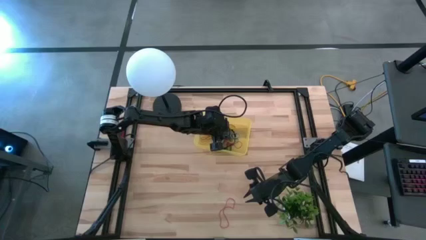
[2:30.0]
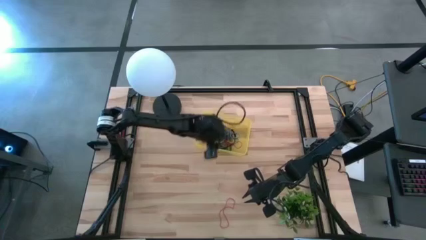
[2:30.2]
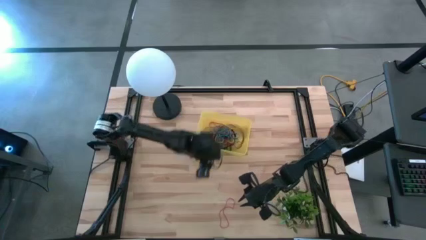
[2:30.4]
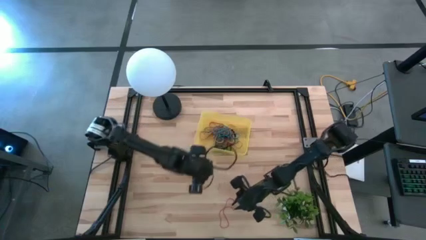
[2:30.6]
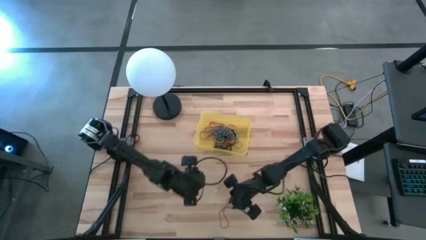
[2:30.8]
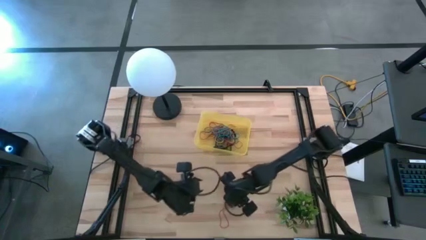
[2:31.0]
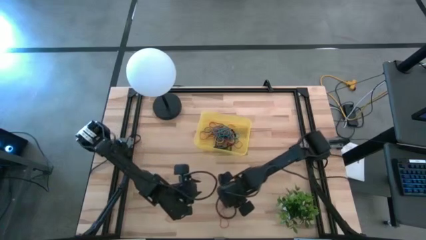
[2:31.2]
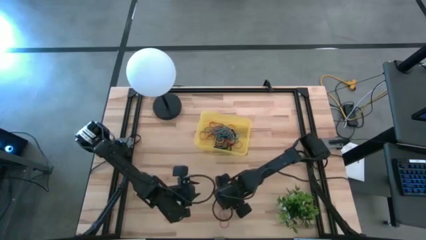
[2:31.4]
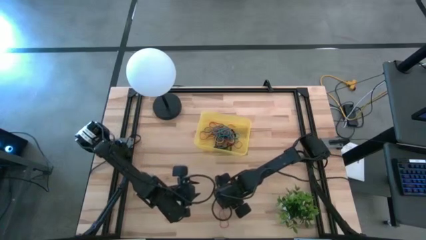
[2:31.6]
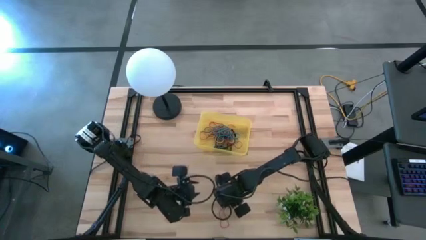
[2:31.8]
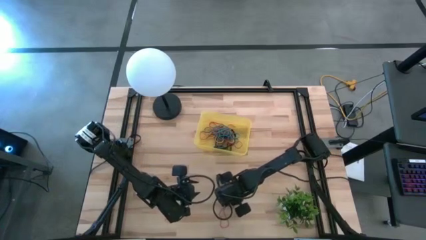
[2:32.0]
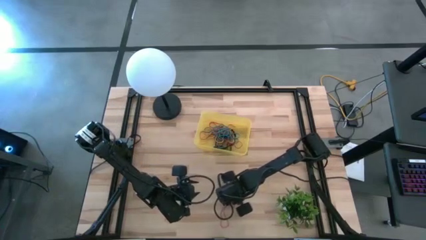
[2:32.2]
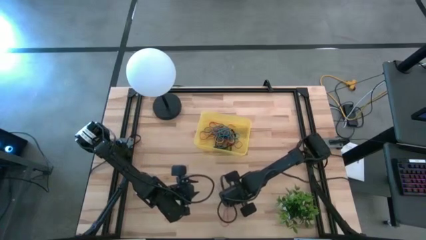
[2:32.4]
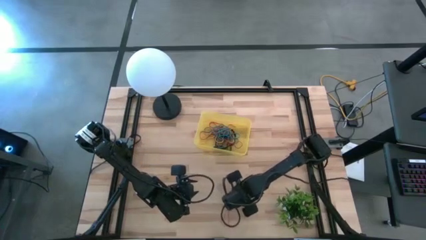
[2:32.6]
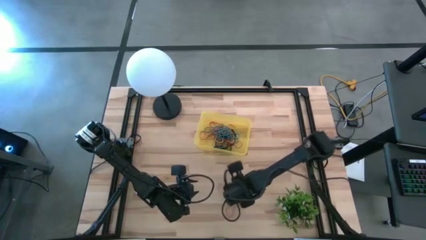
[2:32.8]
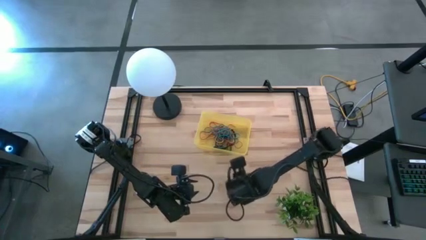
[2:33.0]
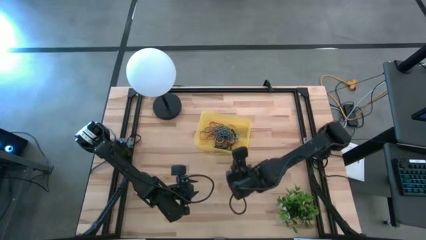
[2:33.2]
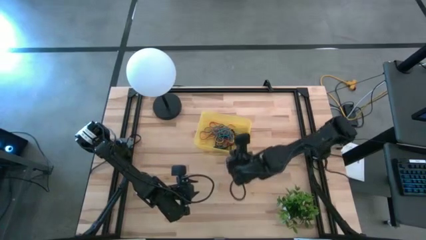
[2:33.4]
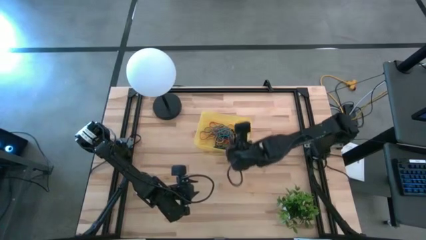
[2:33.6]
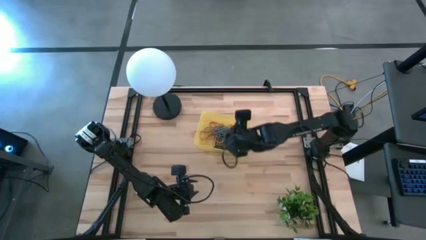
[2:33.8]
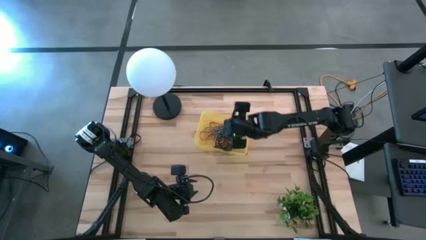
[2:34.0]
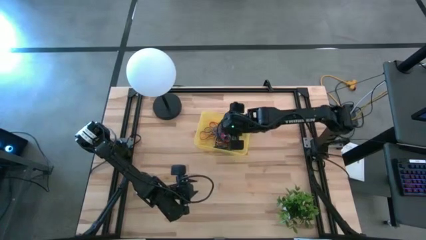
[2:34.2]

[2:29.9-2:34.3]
Task: Pick and place rubber bands into bin
Put the red rubber band into the yellow bin

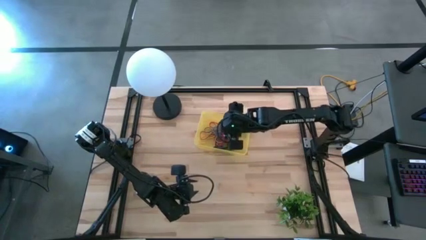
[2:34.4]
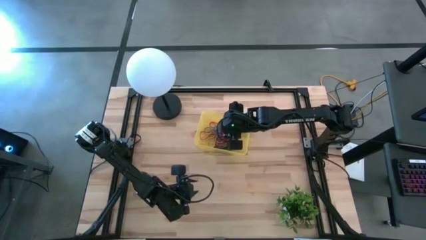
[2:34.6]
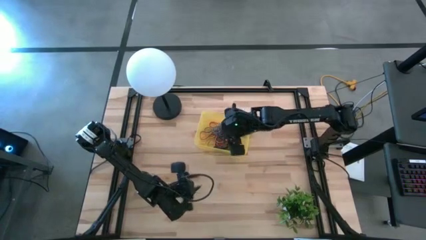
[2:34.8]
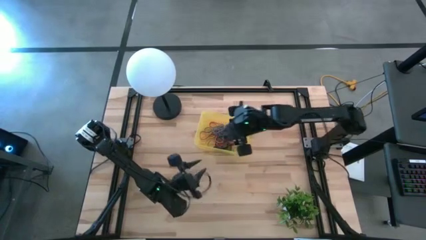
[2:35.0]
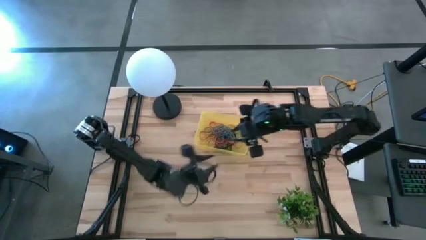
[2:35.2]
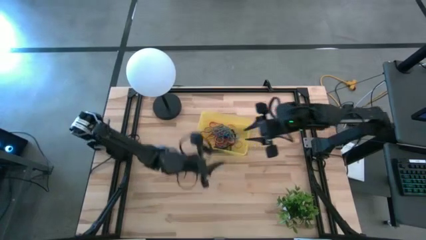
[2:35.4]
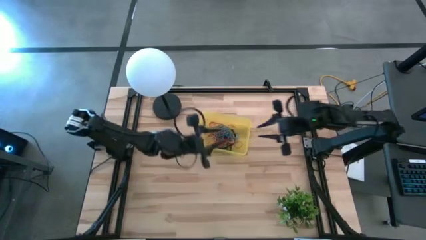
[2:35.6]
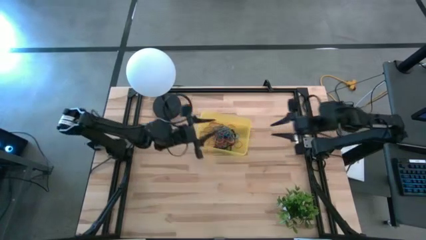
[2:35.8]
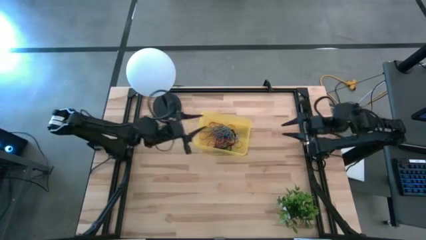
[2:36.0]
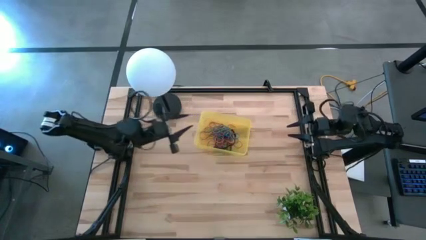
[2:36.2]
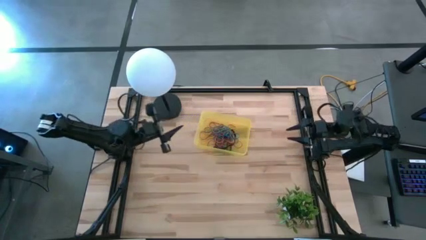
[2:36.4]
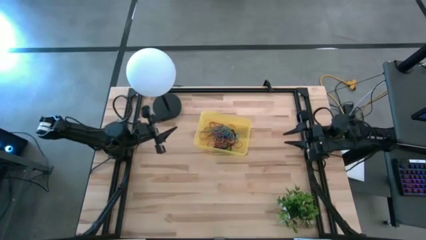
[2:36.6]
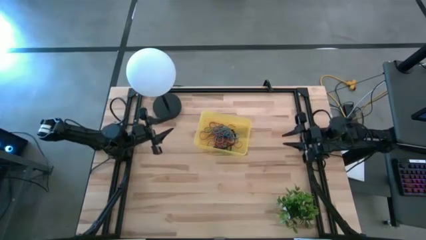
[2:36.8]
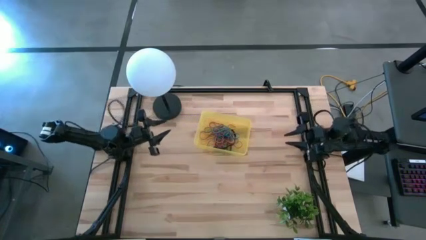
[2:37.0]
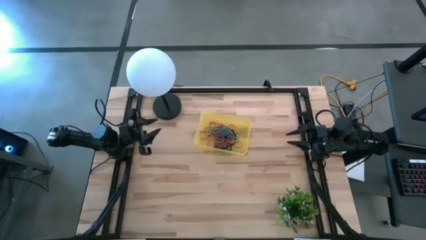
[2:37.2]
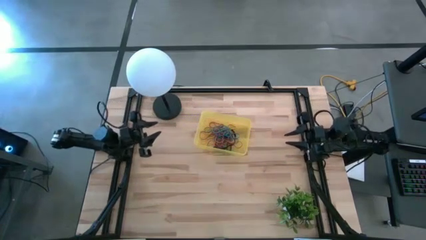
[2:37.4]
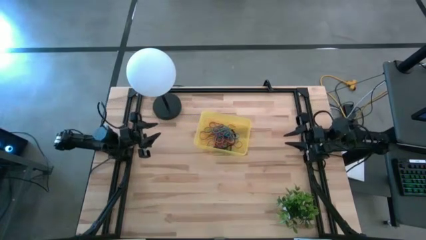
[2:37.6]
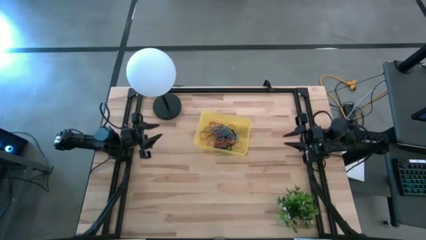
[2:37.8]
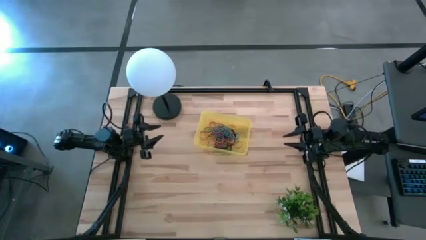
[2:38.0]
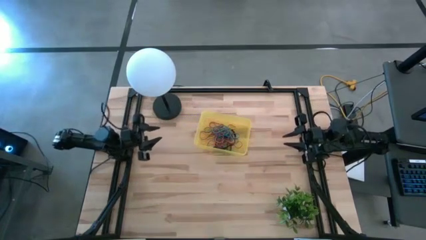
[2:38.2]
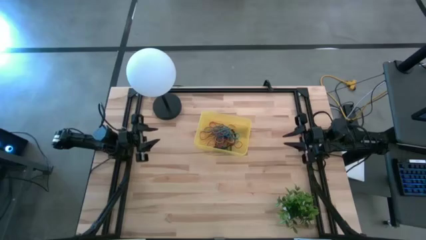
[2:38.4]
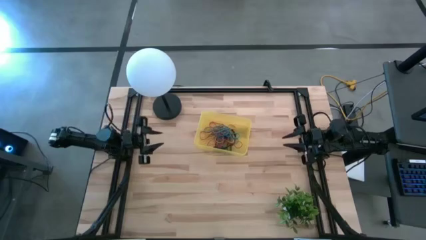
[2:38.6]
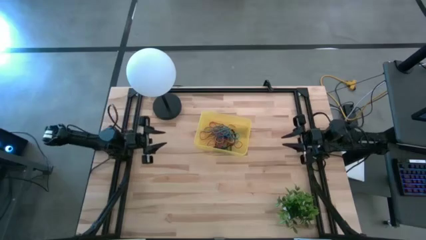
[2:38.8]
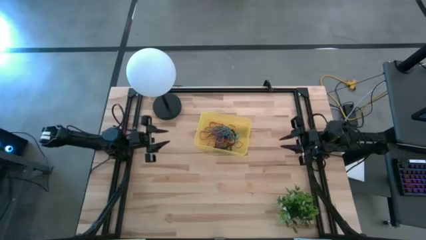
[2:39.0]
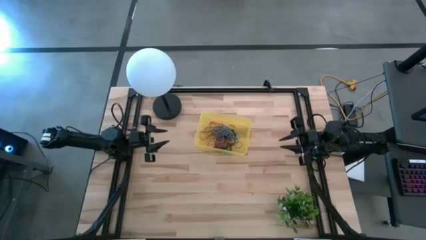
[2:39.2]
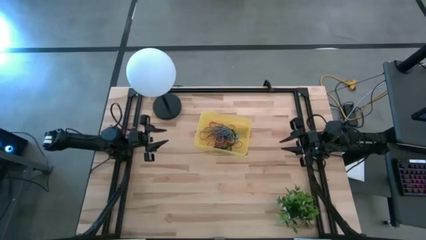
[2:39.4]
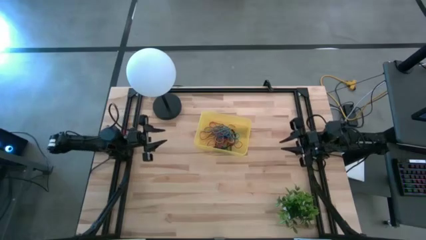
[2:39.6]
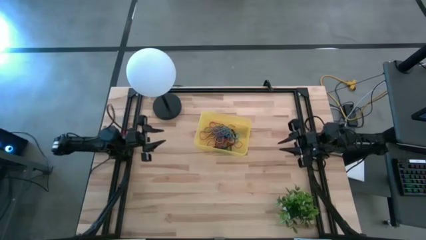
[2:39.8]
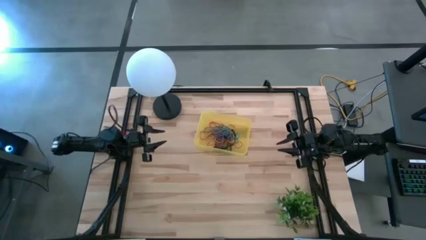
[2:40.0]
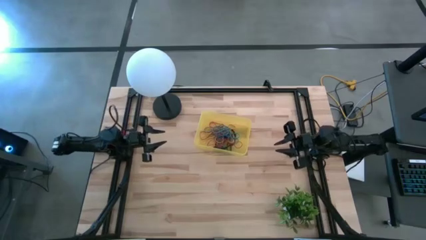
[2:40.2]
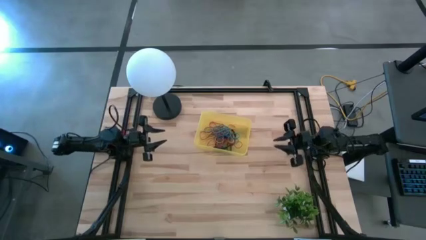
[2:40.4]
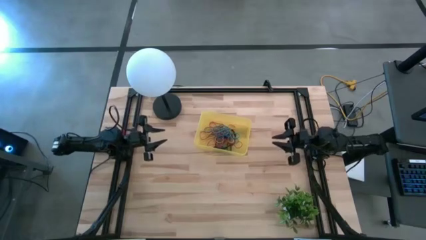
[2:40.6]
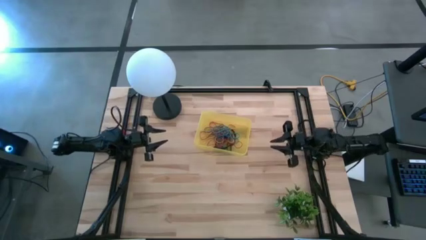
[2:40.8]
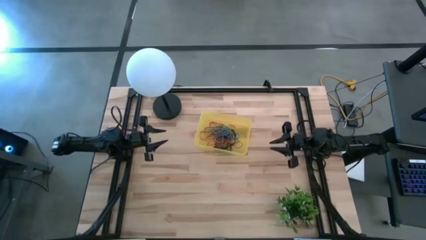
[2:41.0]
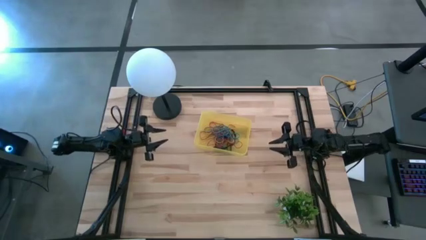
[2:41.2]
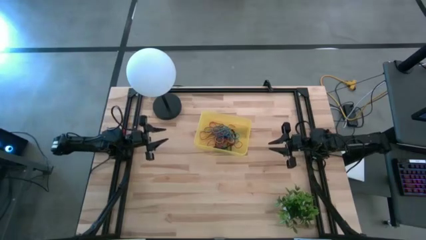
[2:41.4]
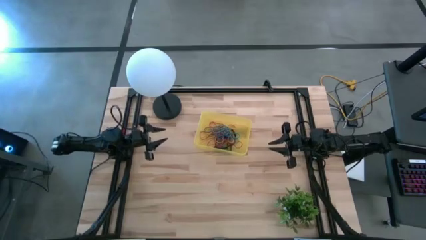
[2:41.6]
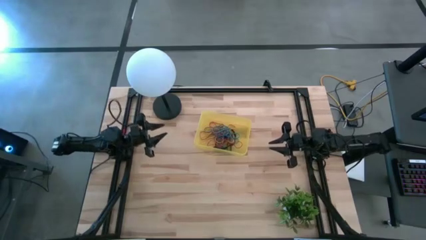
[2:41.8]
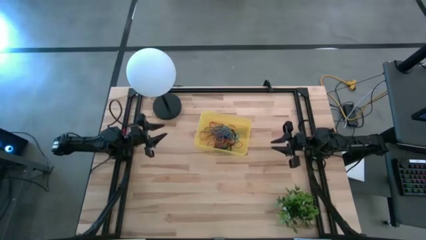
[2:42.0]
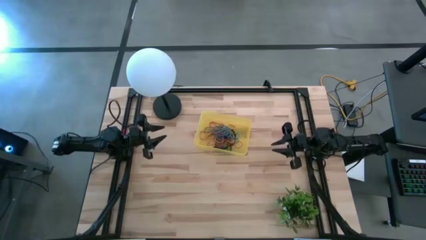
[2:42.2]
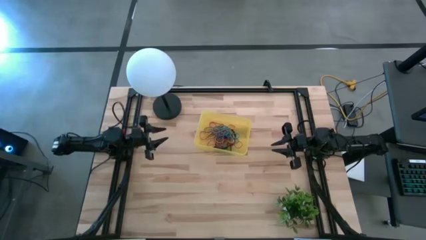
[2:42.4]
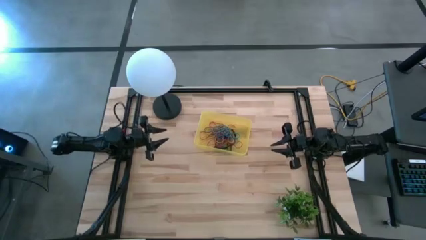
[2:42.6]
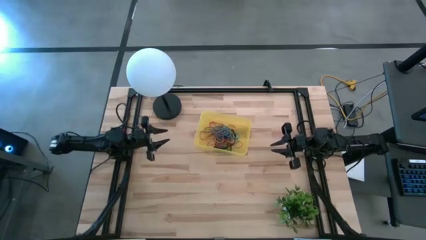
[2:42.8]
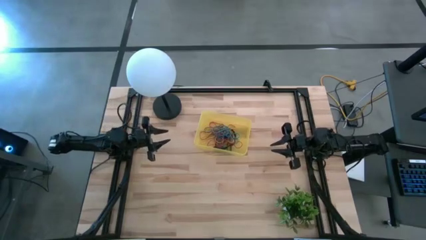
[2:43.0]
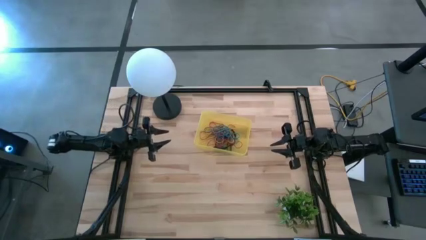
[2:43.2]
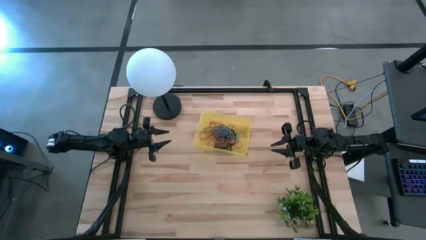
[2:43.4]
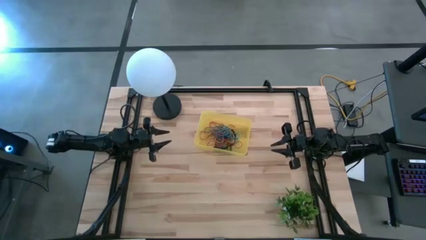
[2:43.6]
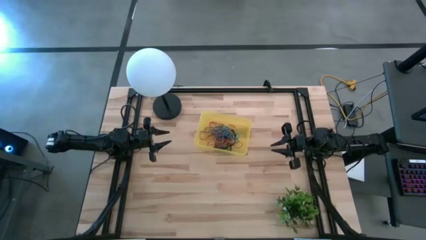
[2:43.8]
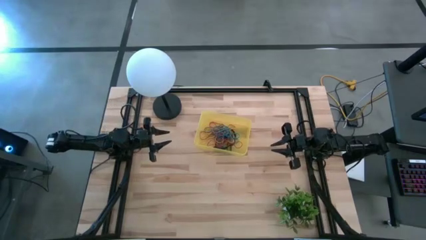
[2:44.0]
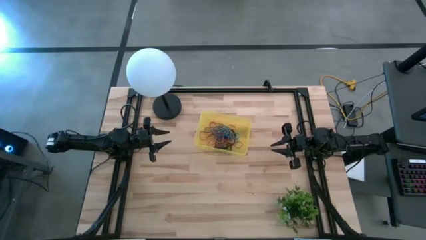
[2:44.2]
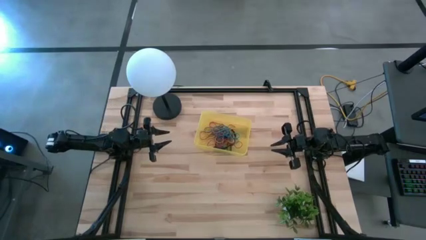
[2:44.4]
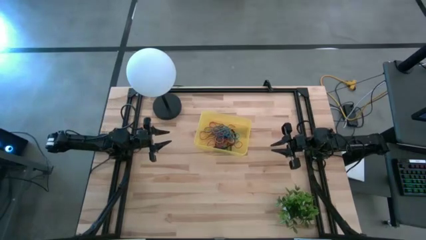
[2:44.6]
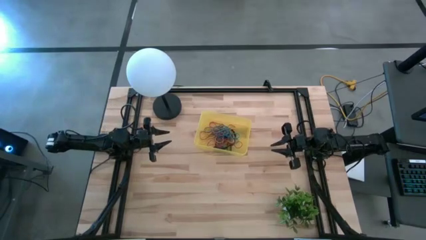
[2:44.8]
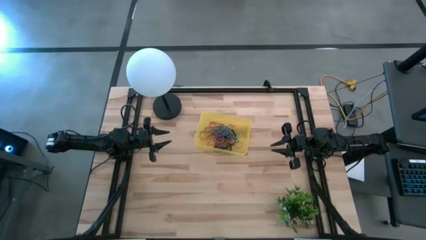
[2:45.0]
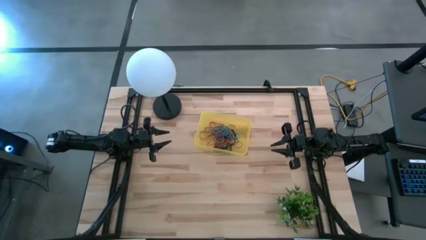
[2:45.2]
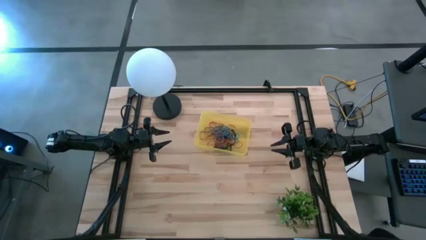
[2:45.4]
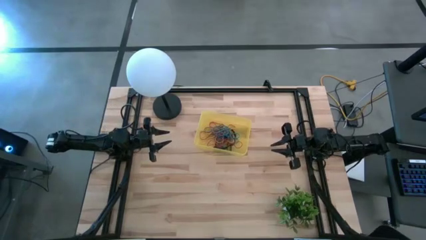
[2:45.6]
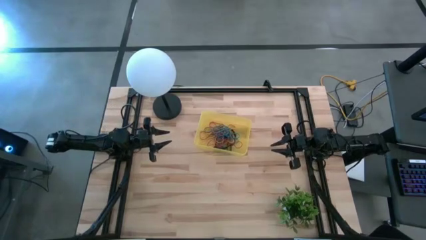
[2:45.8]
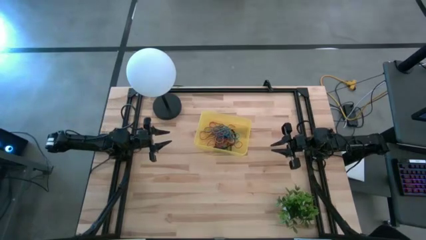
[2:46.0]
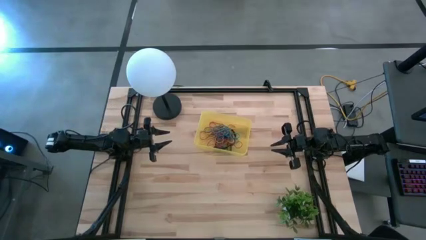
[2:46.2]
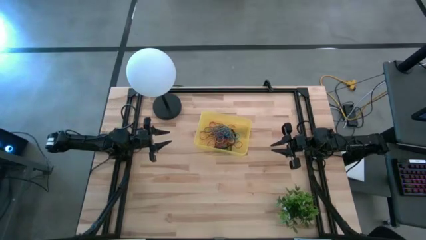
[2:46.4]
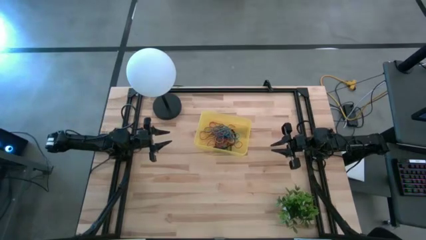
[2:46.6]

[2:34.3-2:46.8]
Return to Home Position
